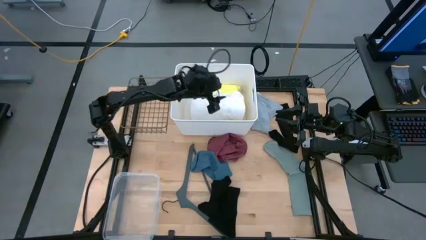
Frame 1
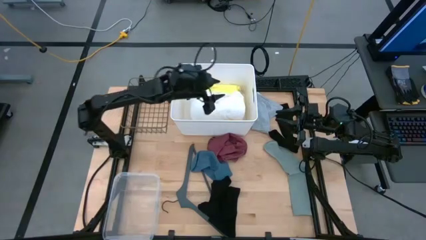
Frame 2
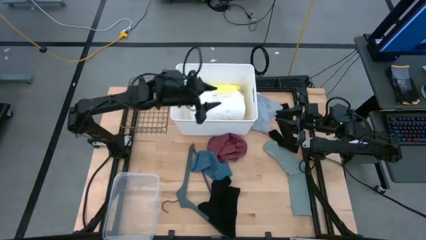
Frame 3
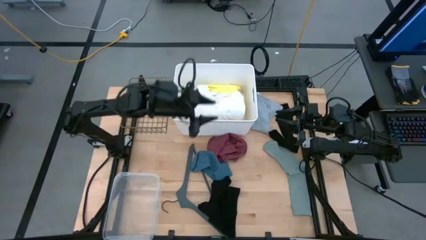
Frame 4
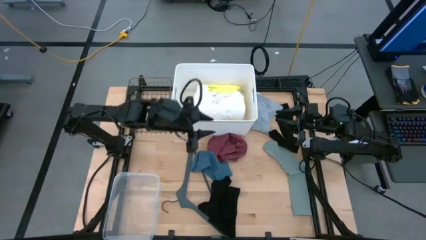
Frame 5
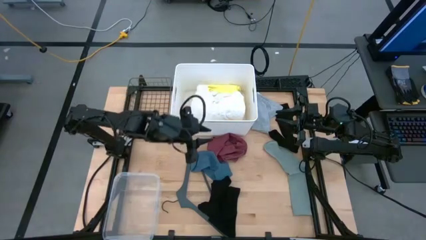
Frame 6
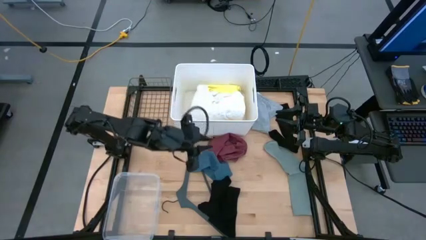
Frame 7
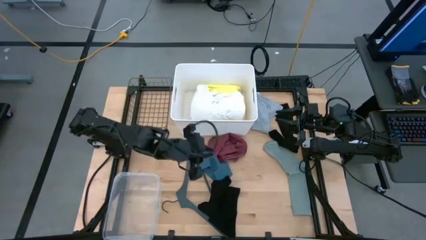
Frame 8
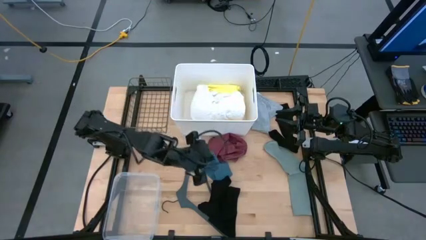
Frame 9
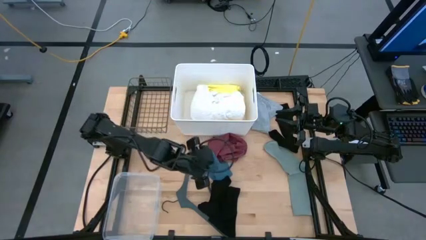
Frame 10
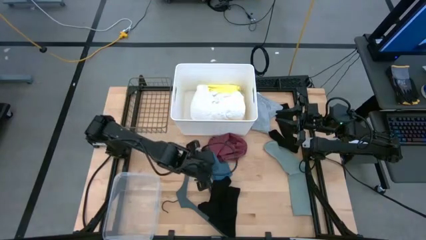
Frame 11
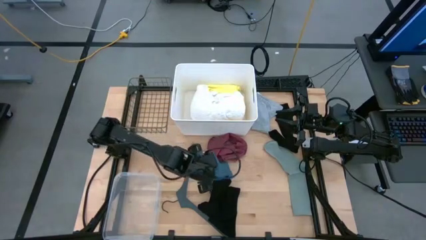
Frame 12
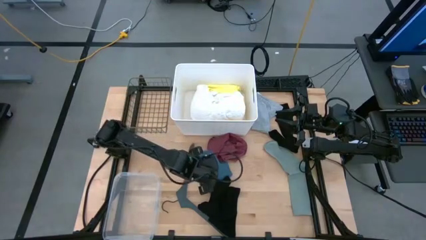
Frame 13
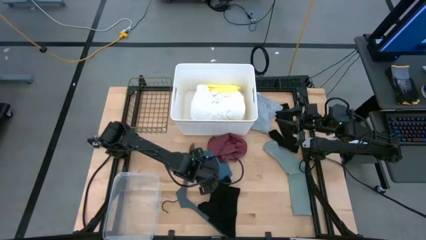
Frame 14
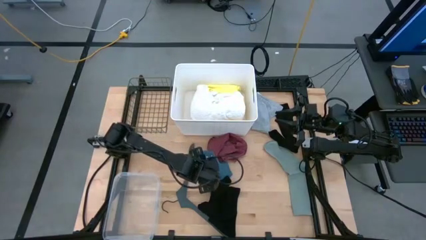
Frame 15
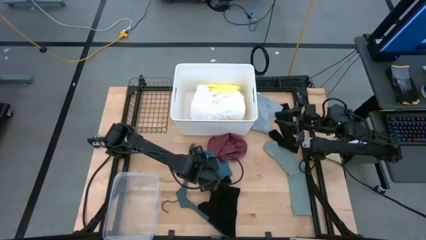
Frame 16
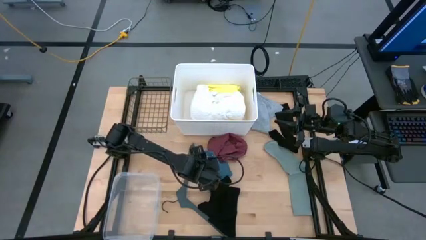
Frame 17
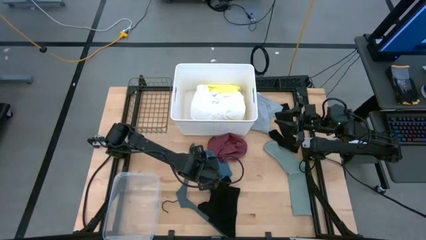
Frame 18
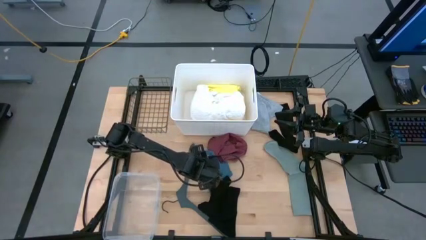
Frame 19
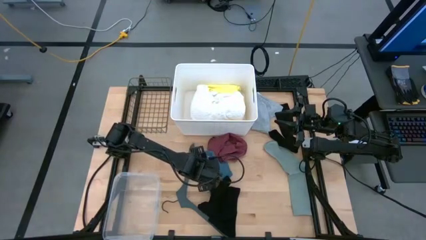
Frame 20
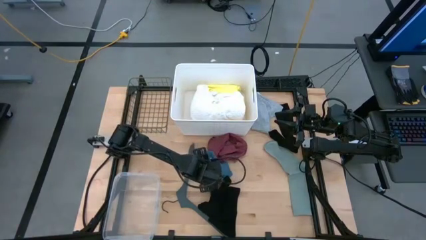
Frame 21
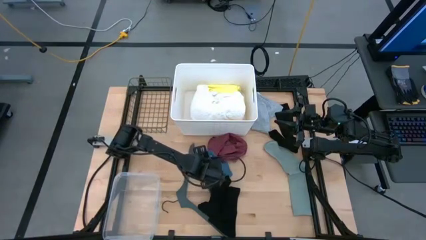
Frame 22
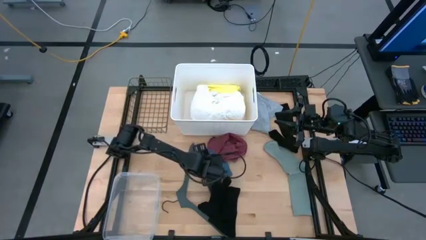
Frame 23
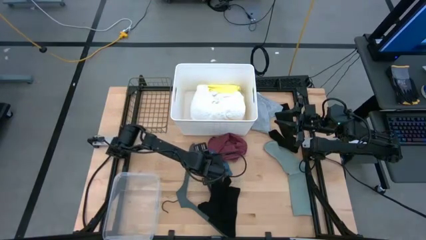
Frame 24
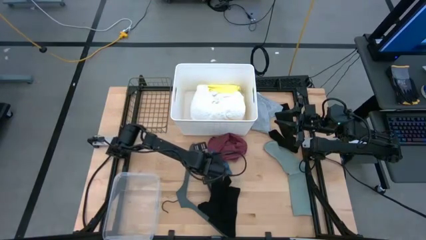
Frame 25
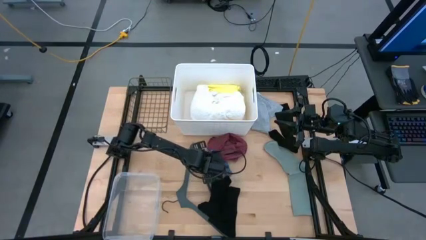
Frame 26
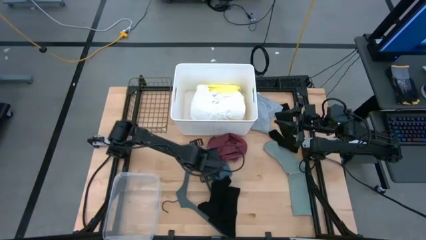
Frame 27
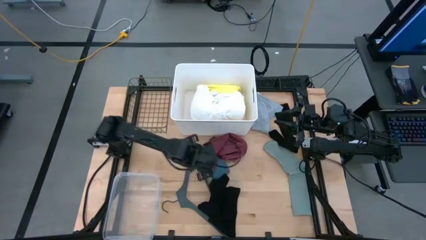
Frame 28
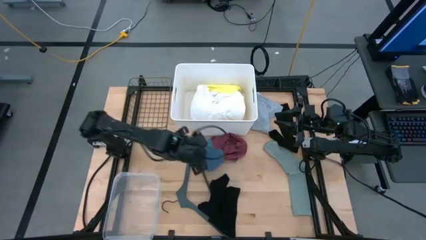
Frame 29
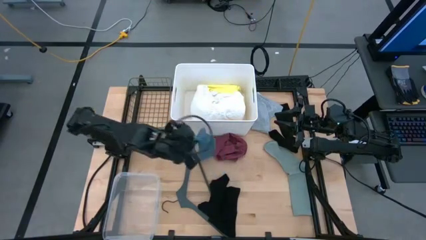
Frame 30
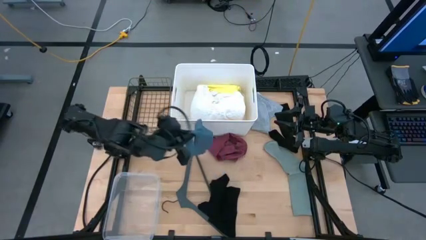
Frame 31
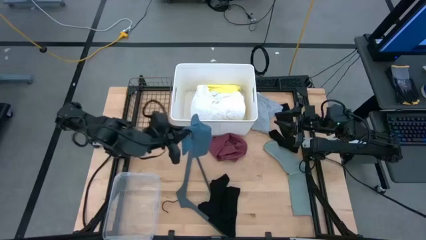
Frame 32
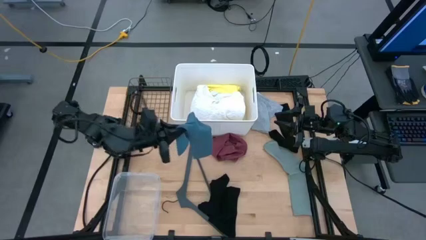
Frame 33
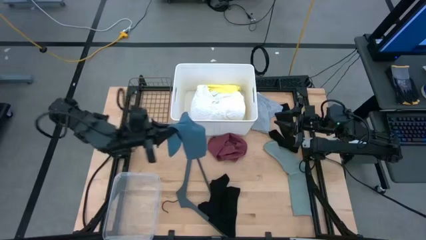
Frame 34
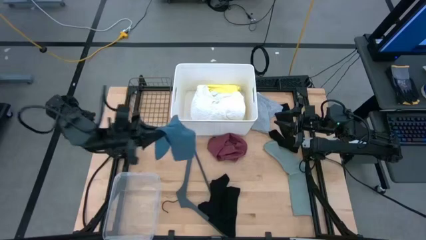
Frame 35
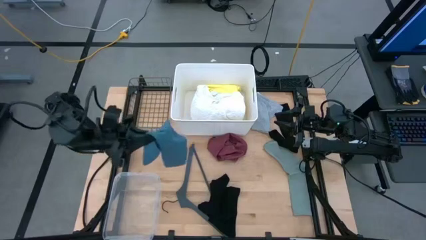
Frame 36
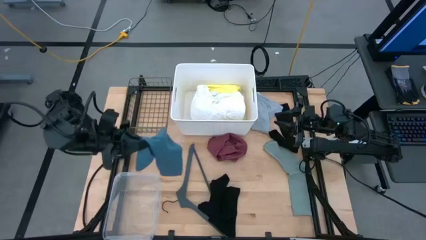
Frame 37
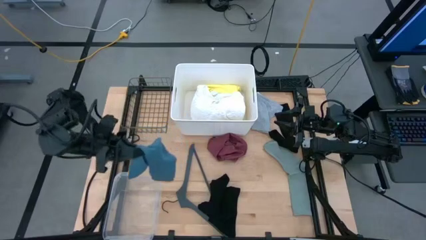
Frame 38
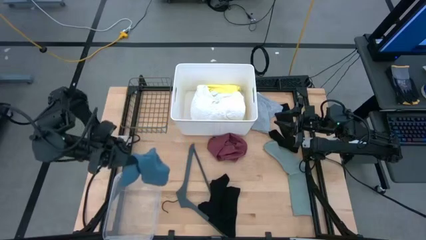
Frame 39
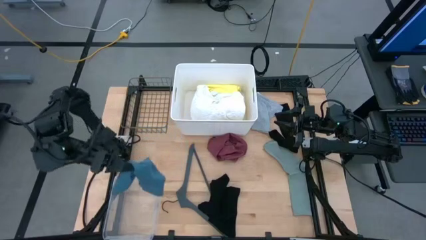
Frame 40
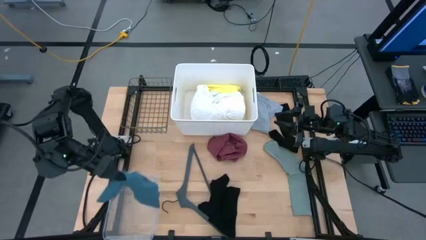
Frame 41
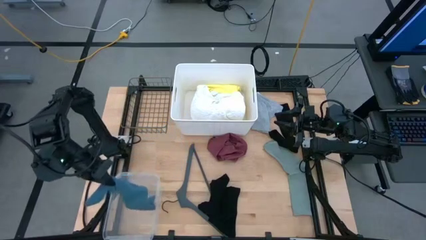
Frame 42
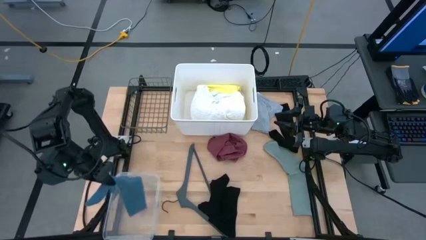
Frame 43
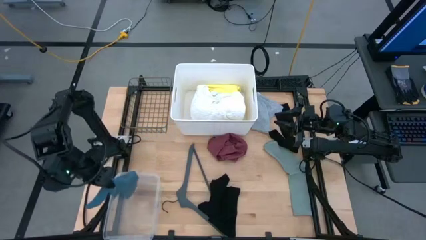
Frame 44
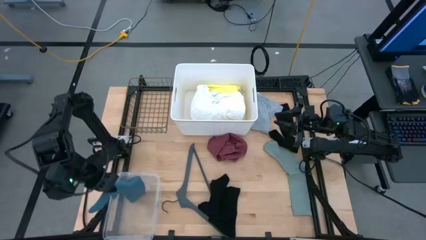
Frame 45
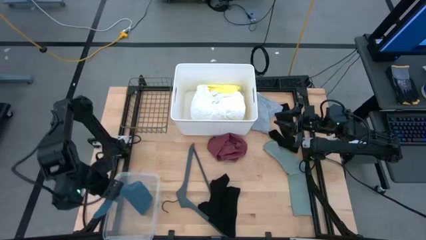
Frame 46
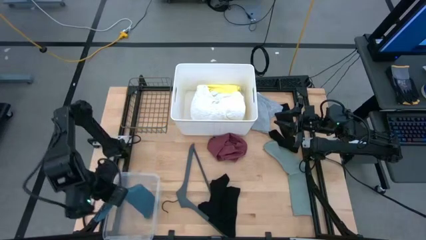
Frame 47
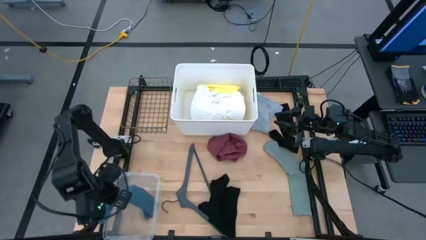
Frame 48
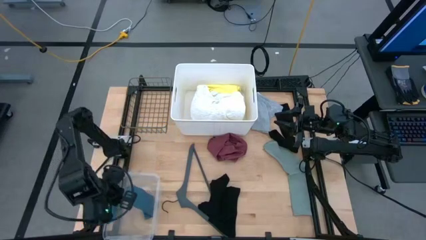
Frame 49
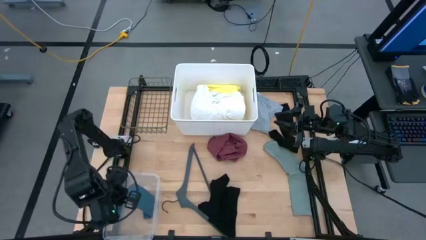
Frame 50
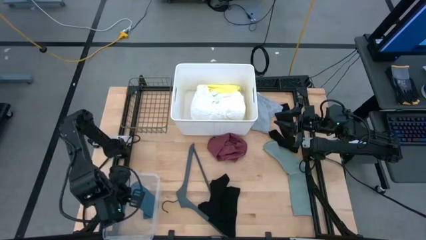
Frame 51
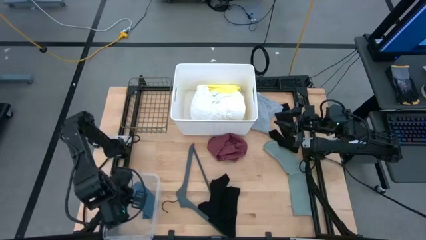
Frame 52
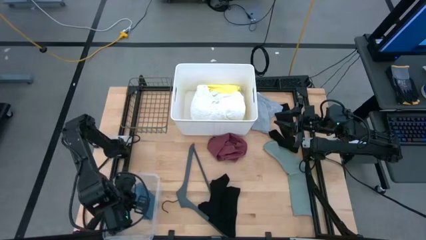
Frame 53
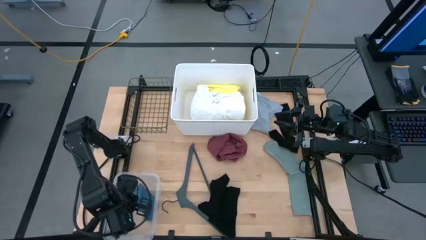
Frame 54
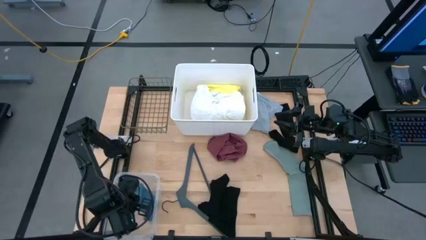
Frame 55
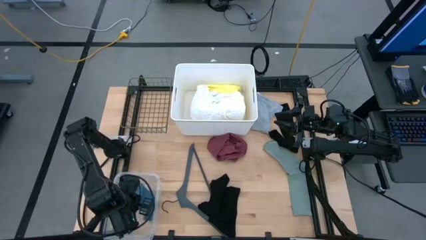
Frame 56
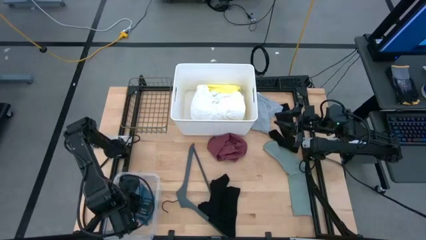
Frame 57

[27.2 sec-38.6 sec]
Task: Pick & Place Cloths
Put the blue sock into the transparent bin
